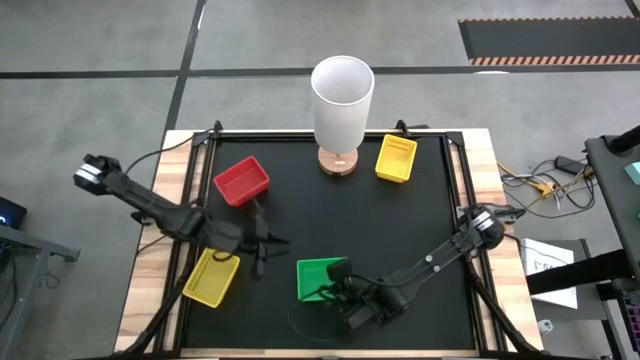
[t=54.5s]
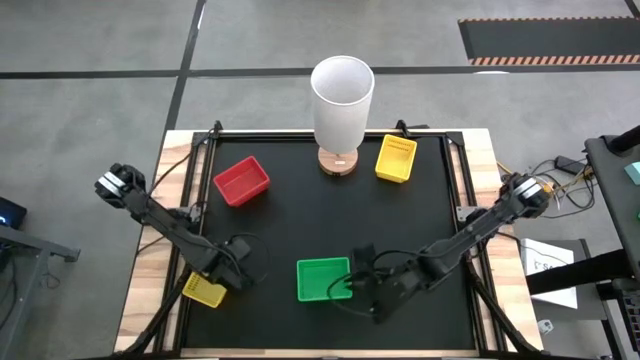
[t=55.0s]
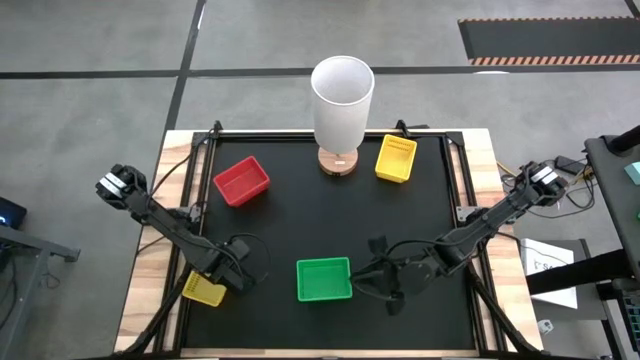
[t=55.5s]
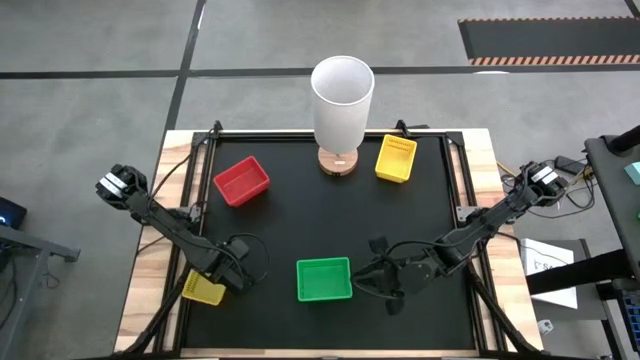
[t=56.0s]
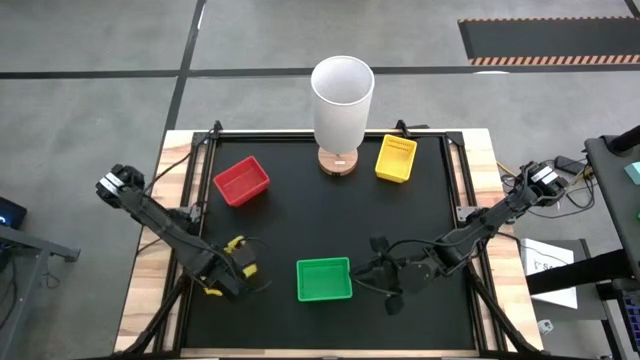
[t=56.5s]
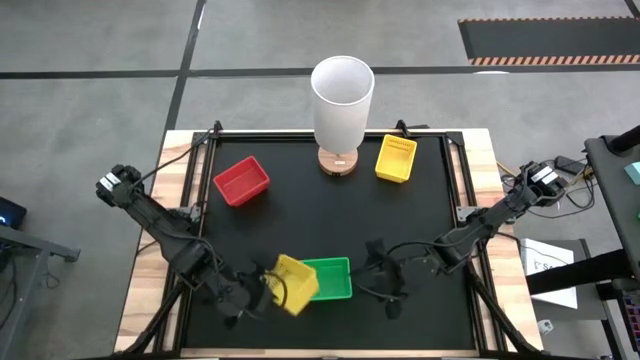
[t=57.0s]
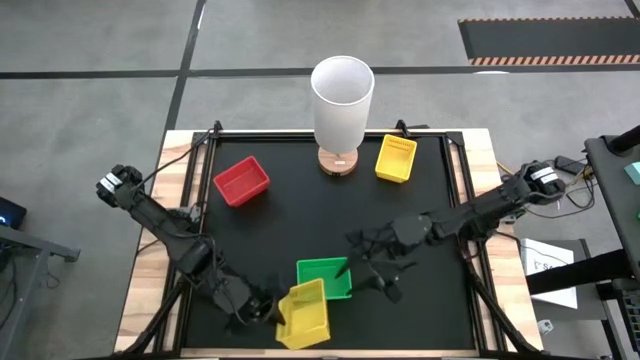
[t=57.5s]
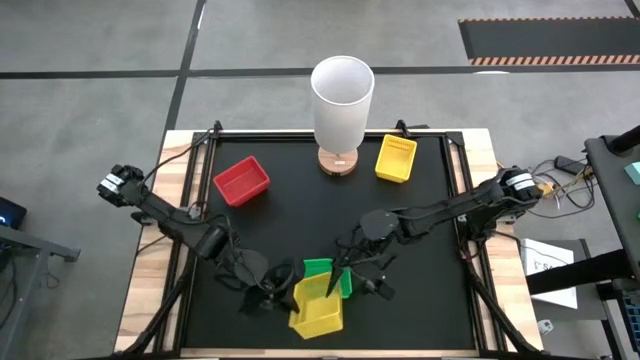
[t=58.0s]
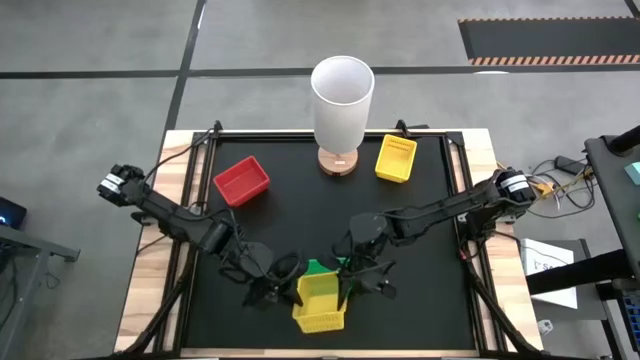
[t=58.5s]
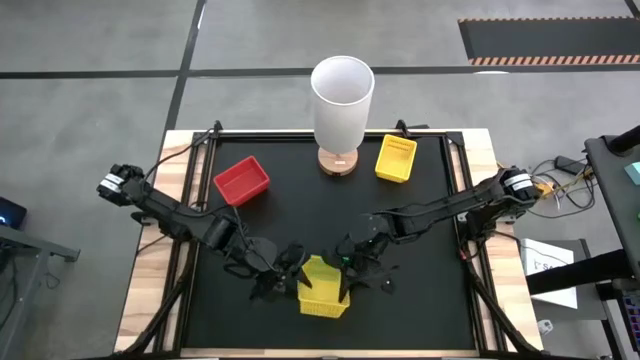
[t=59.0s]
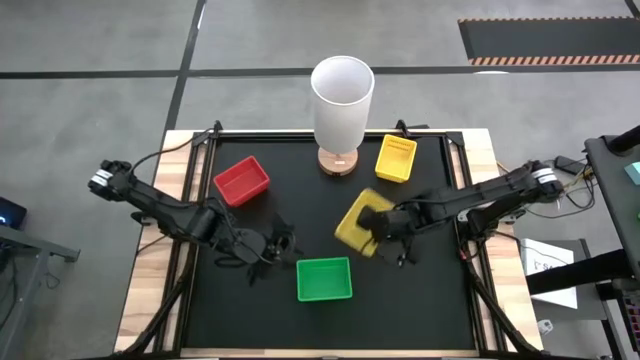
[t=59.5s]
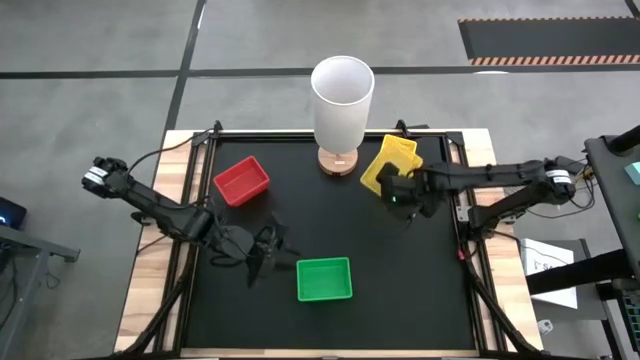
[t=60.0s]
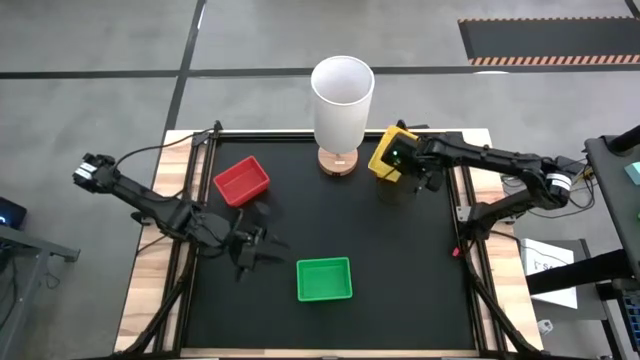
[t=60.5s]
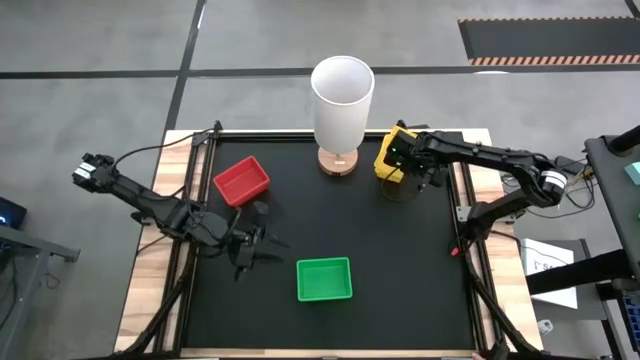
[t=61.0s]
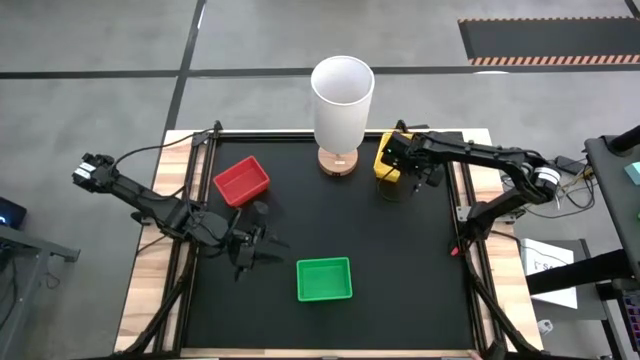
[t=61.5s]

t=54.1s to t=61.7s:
Stack the bottom yellow bin on the stacked yellow bins

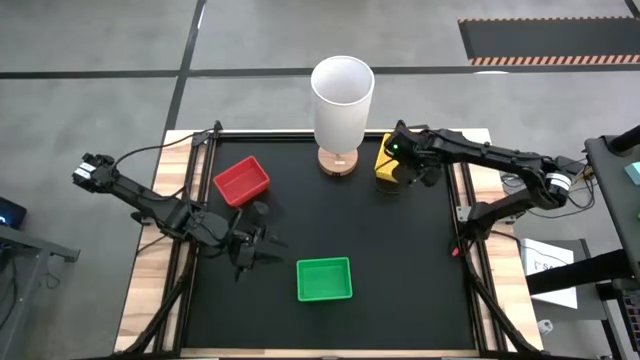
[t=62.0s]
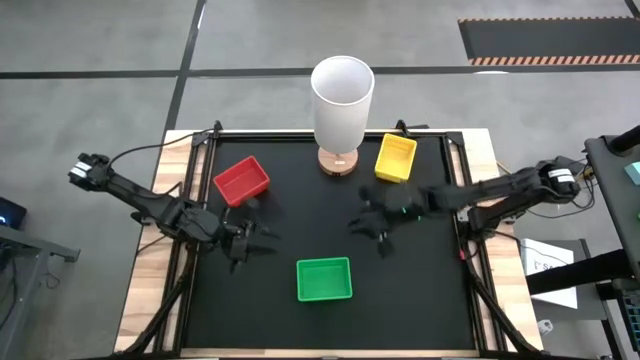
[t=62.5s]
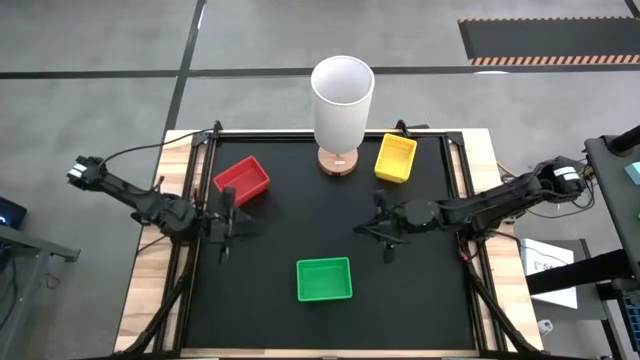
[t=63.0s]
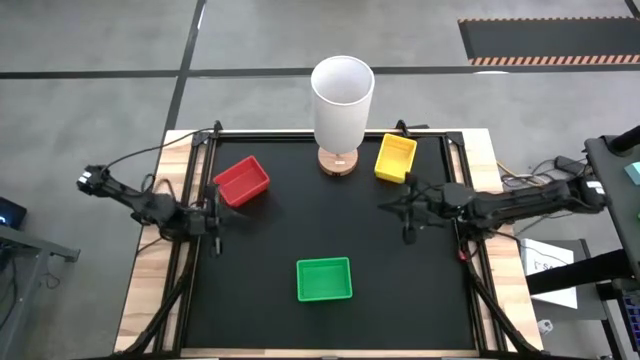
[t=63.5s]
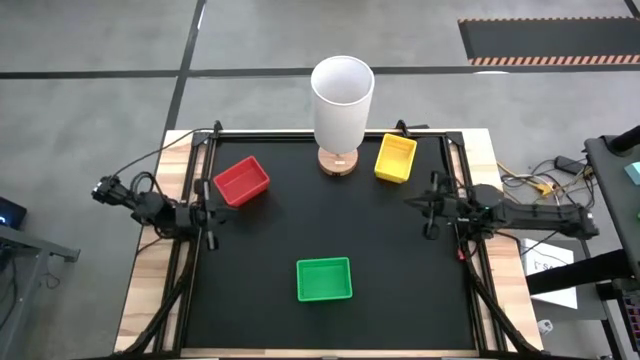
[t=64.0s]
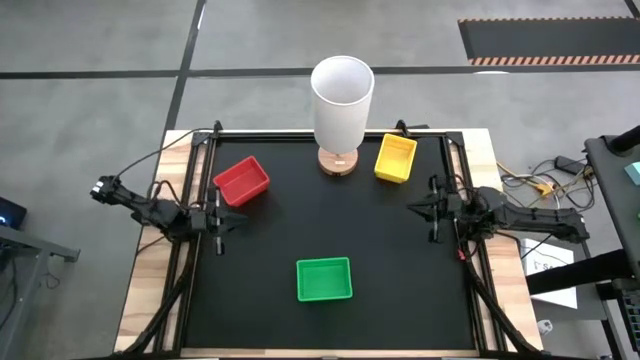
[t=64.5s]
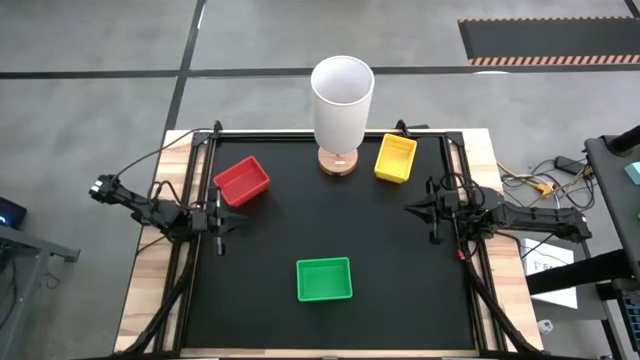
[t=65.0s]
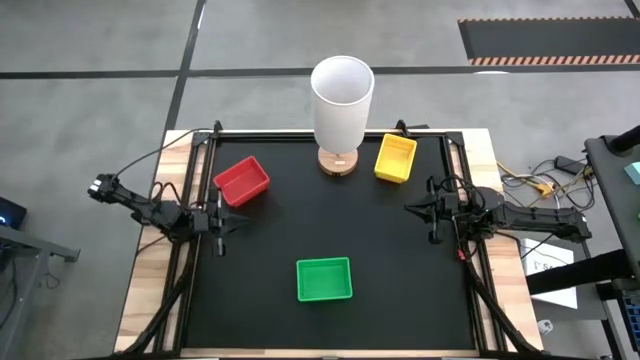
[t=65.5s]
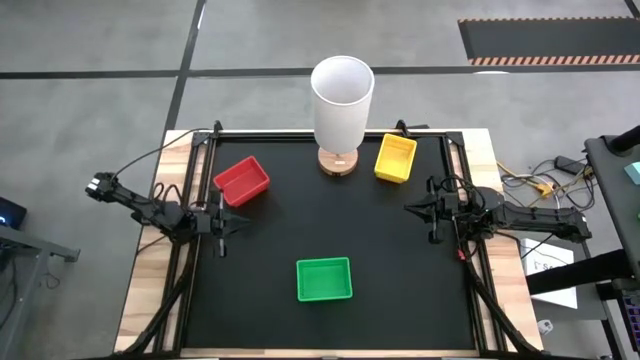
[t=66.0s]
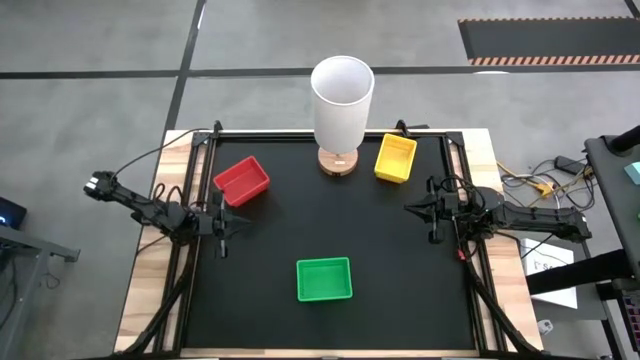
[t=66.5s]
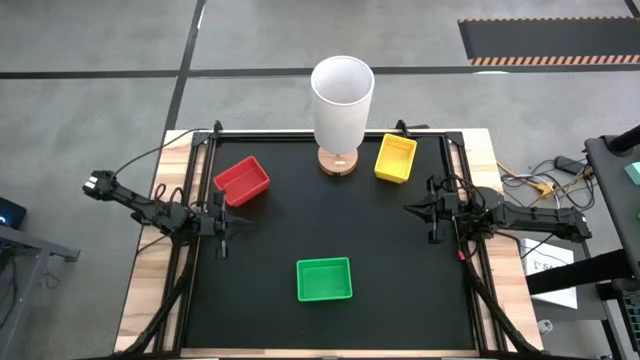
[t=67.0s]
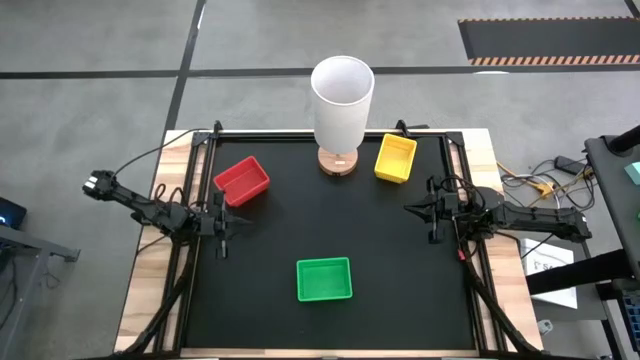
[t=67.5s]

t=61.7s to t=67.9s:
Return to Home Position

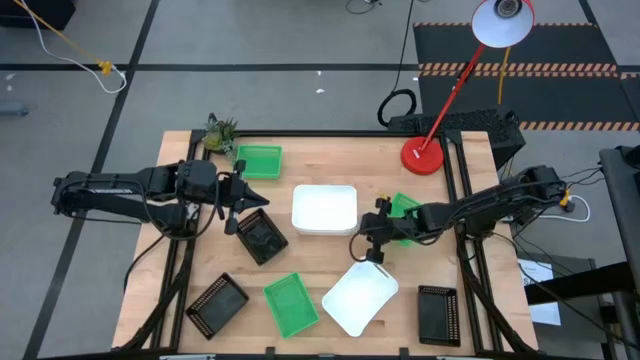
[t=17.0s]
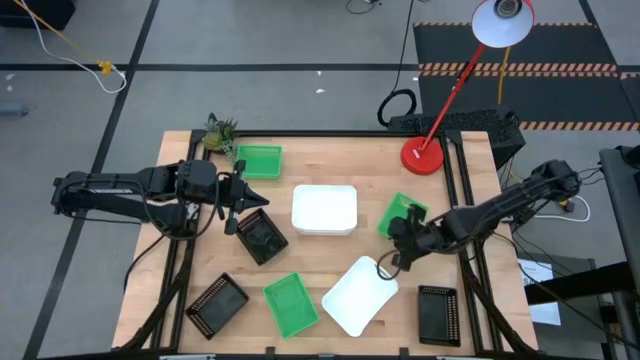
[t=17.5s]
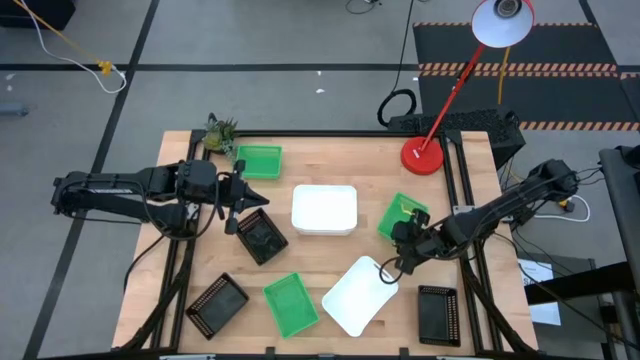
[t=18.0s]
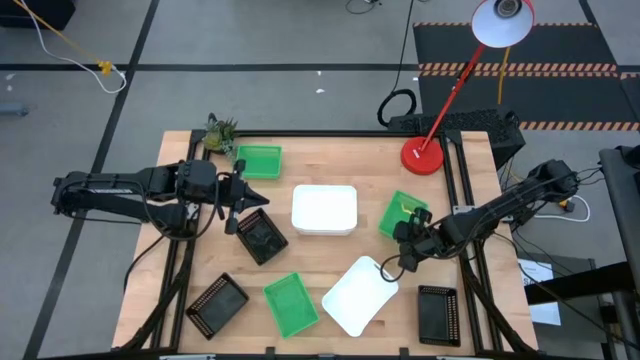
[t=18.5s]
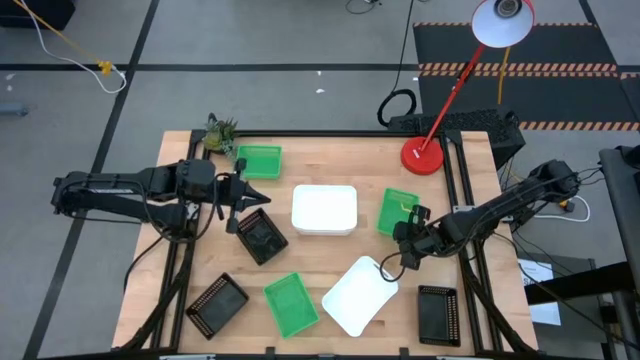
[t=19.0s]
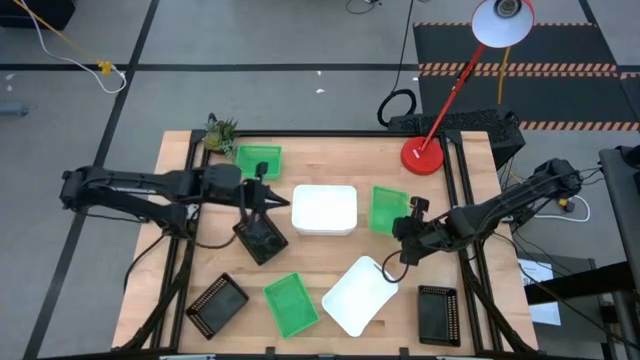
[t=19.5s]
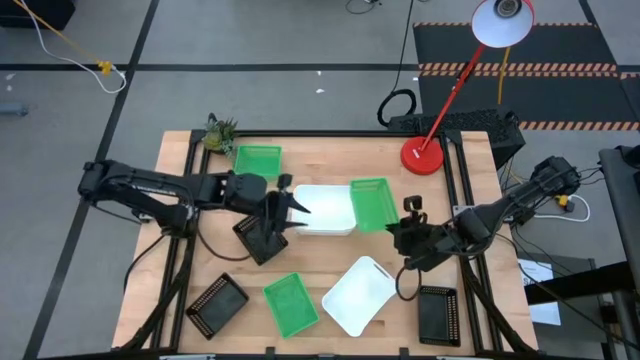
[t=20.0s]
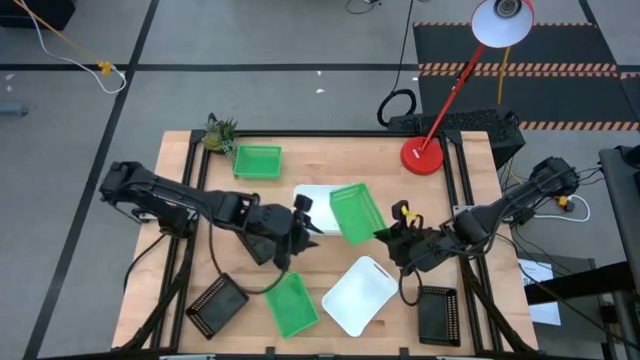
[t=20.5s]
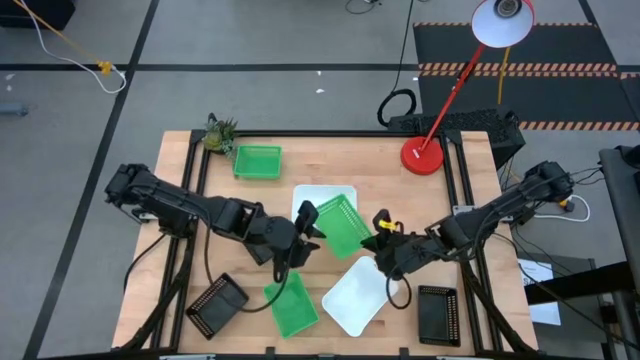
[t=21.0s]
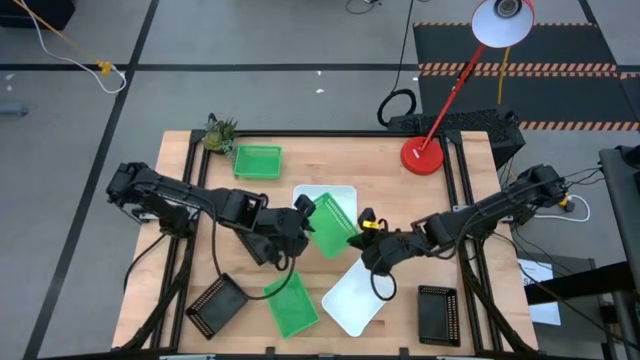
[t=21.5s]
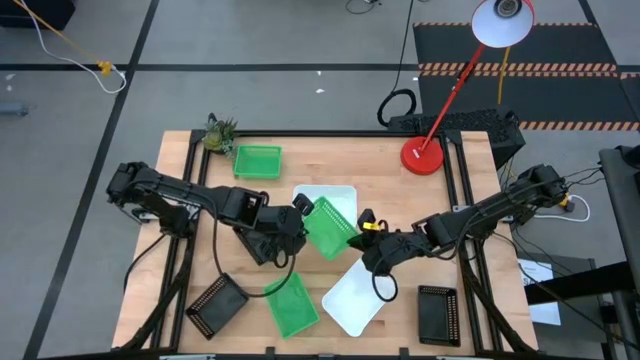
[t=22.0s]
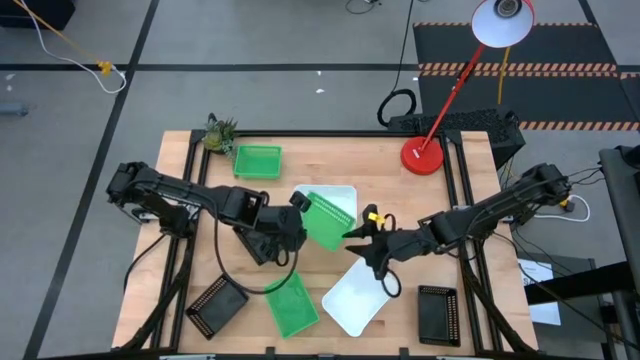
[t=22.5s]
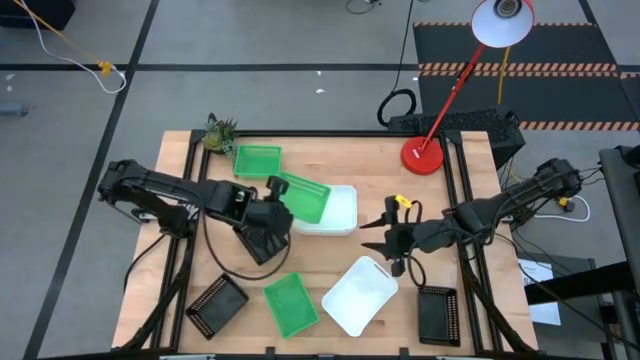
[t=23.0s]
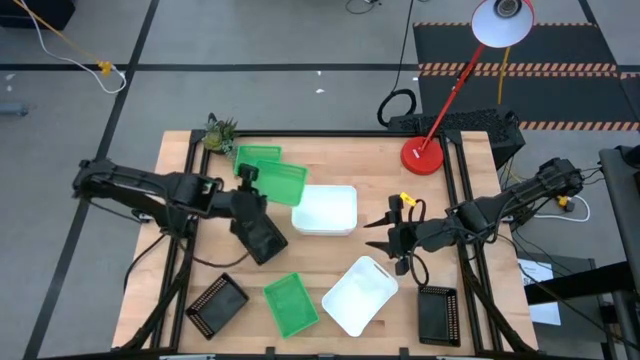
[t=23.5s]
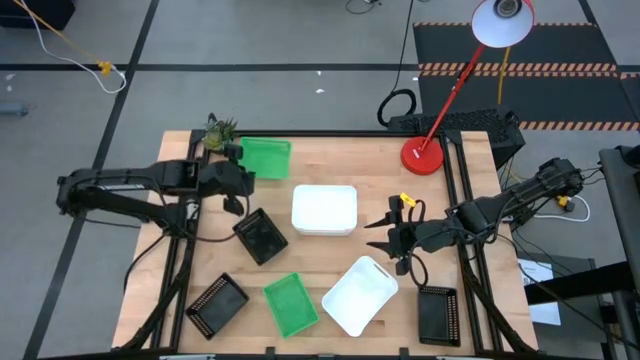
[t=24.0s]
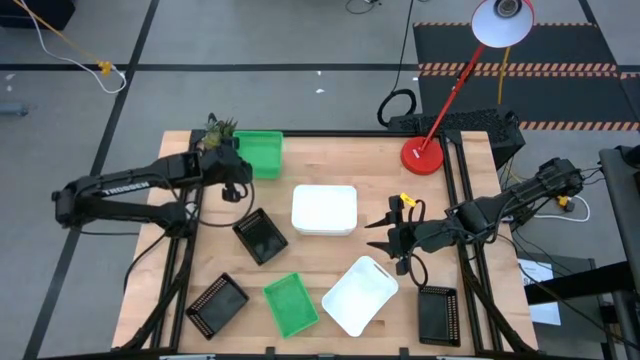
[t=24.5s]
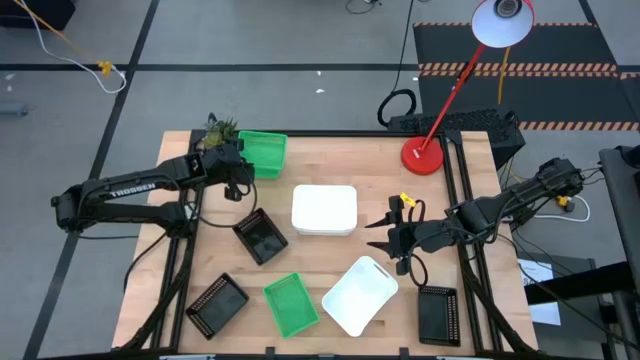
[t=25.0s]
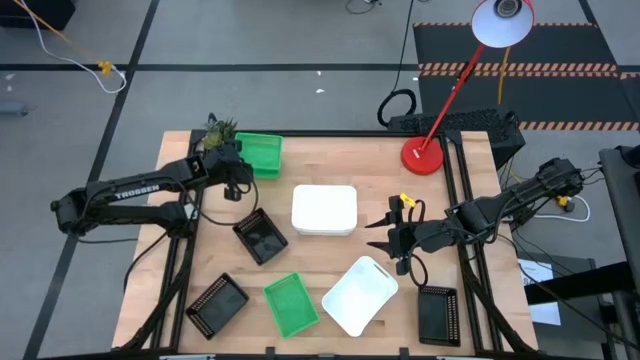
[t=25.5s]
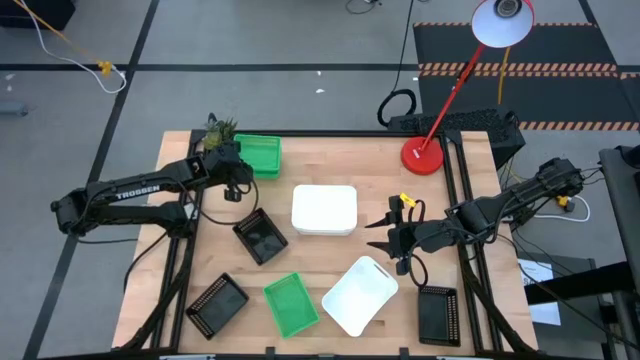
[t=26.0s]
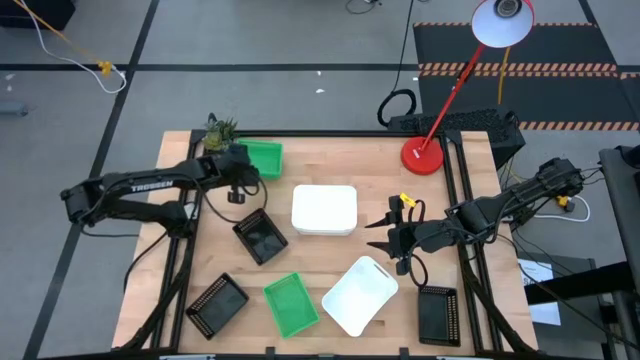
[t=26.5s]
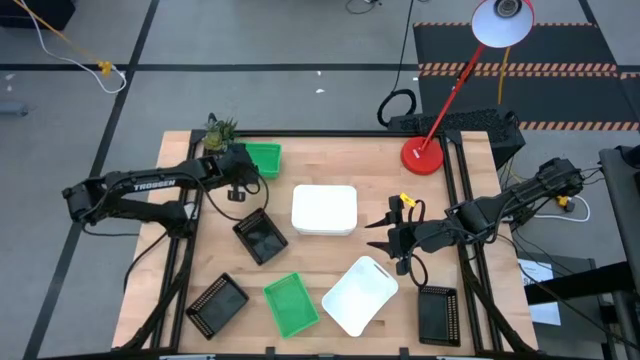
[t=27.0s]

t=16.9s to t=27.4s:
Stack the middle right green bin on top of the top green bin
